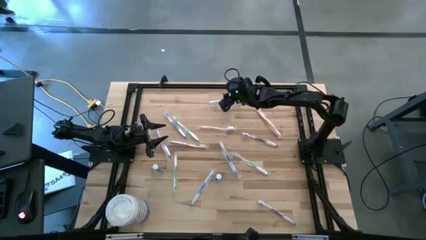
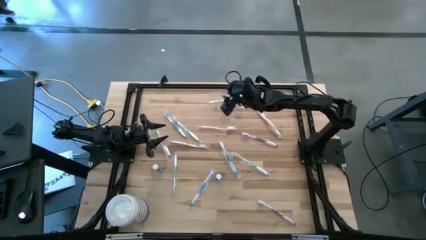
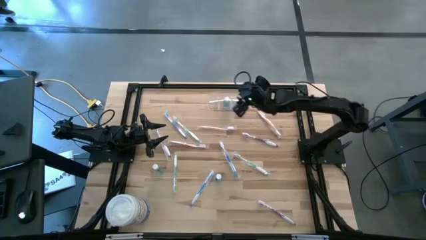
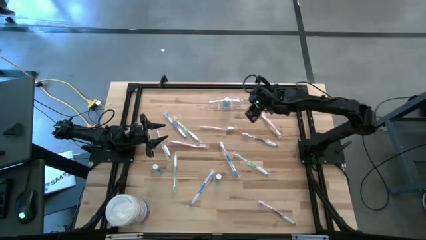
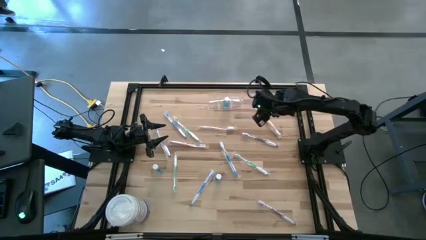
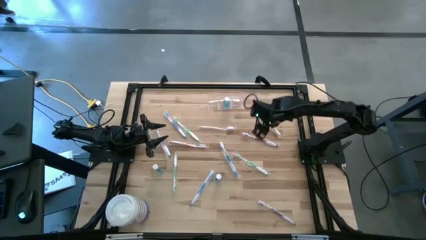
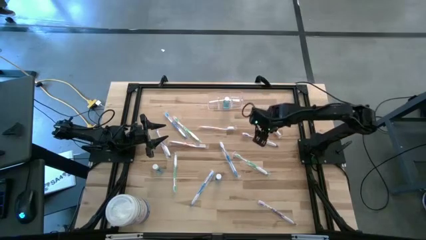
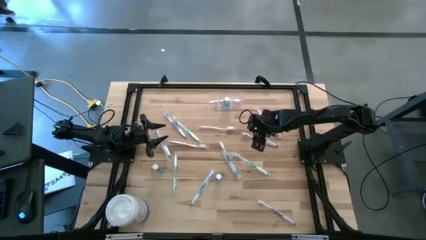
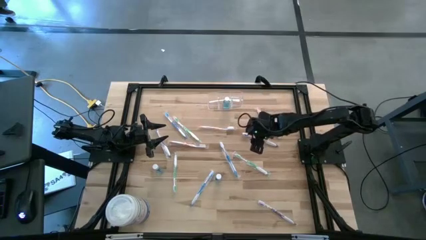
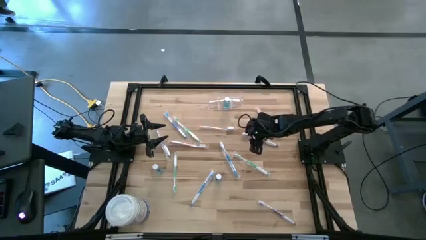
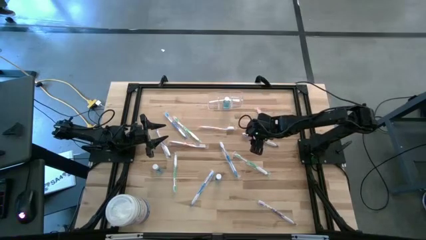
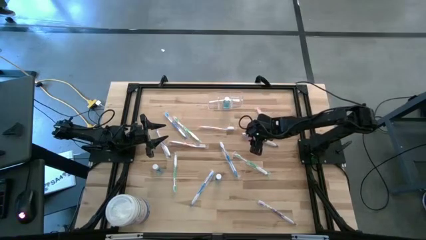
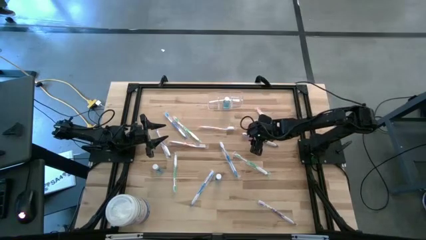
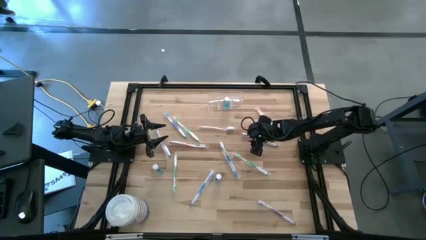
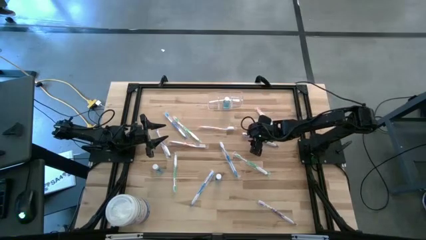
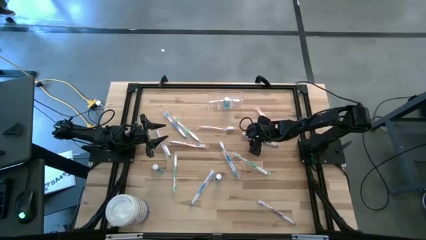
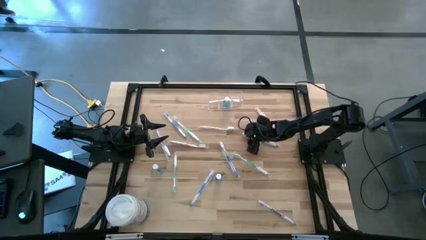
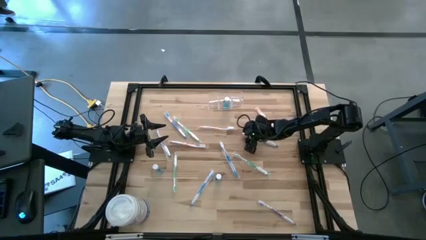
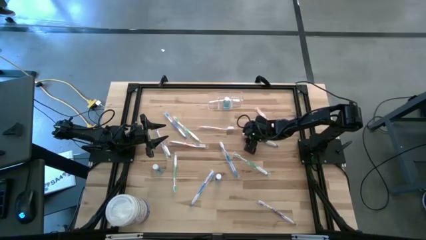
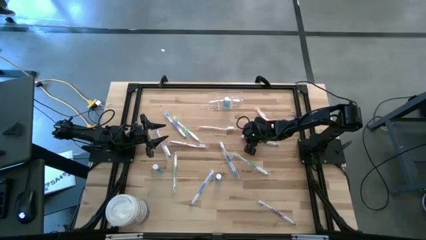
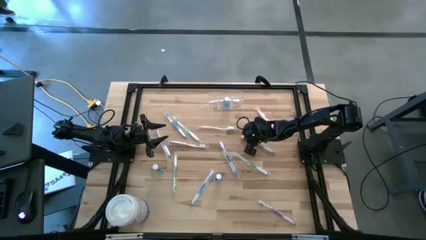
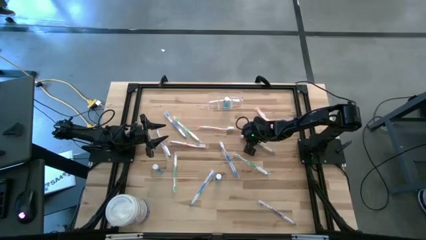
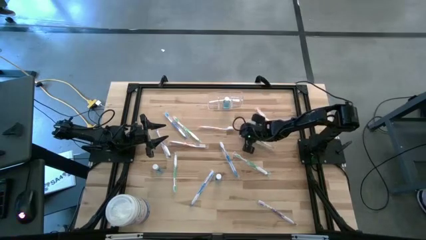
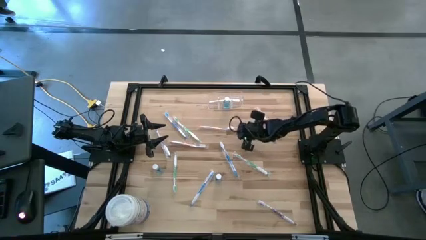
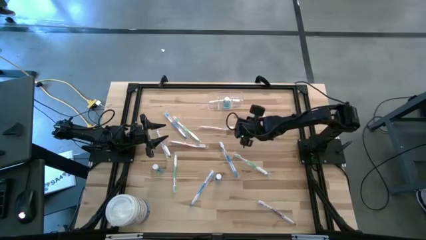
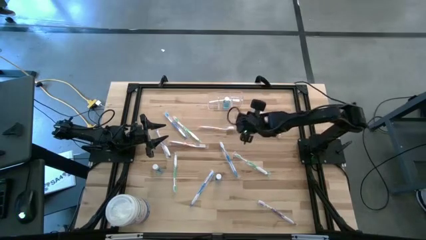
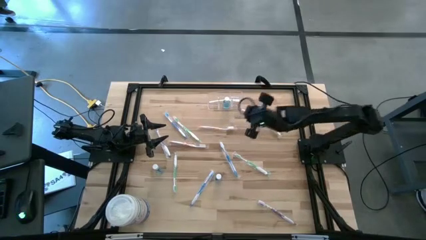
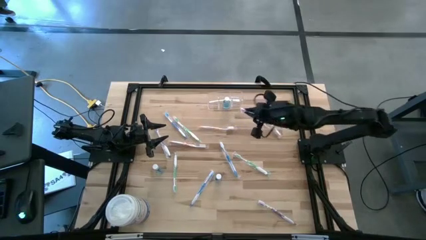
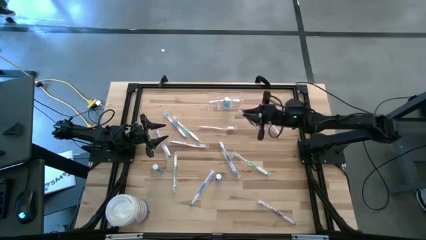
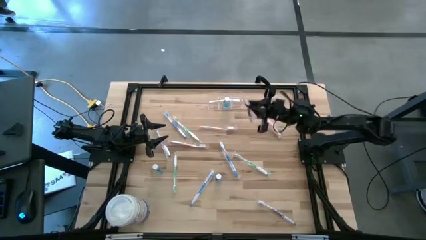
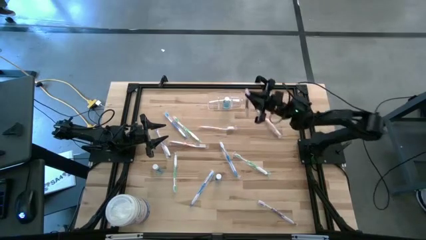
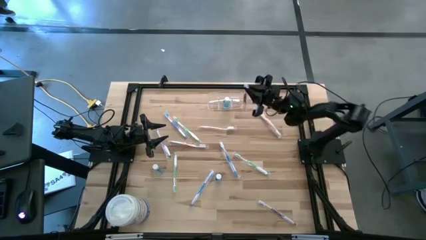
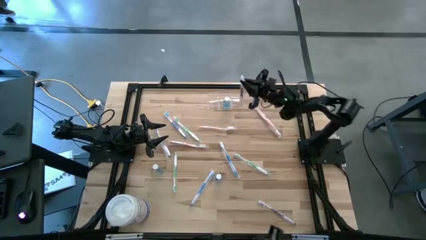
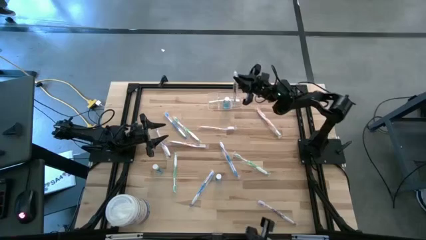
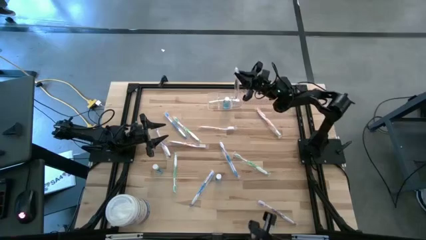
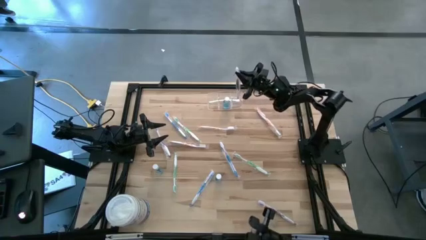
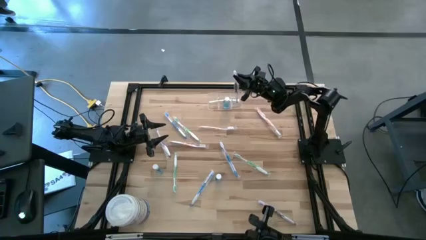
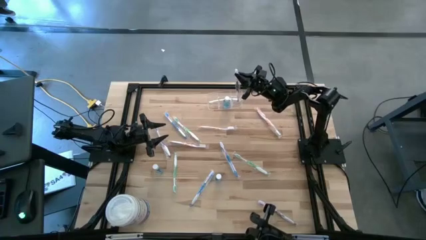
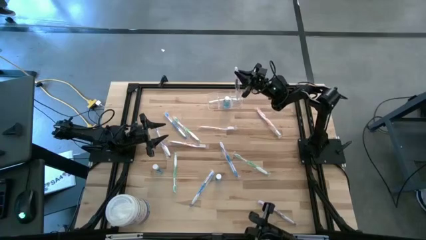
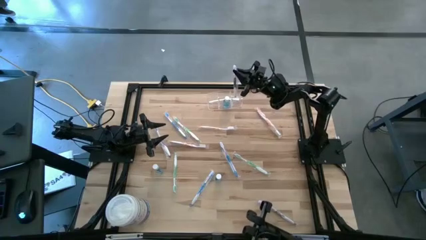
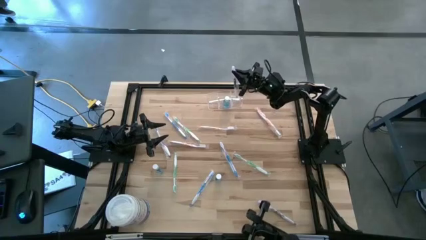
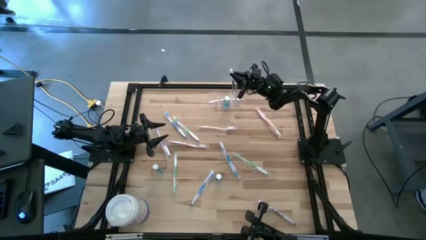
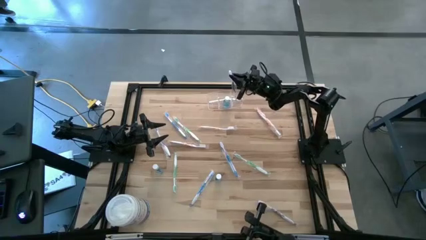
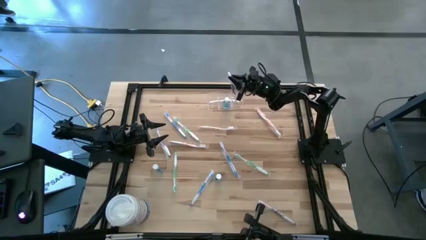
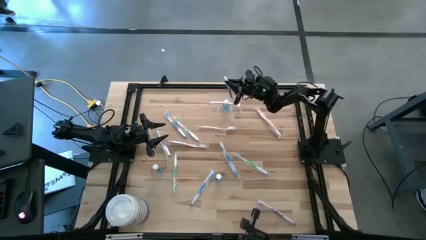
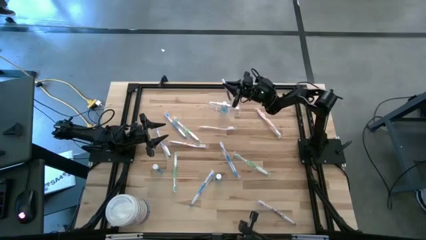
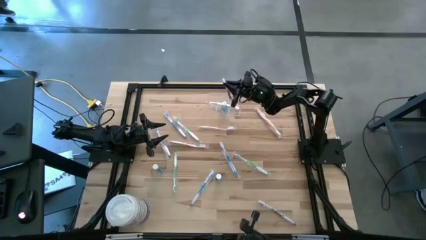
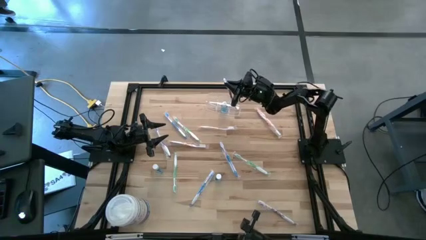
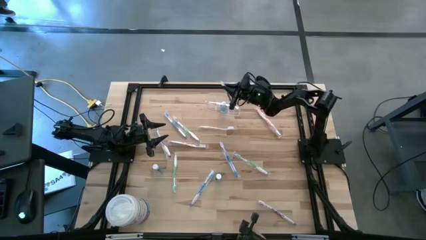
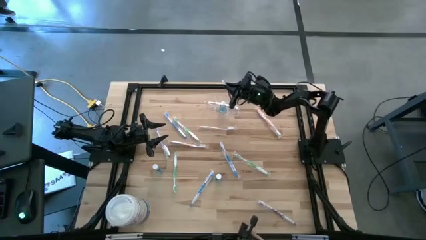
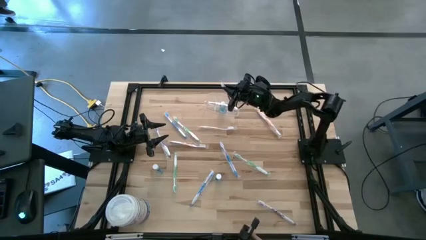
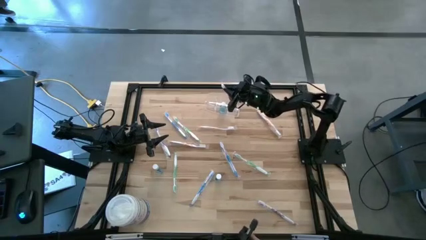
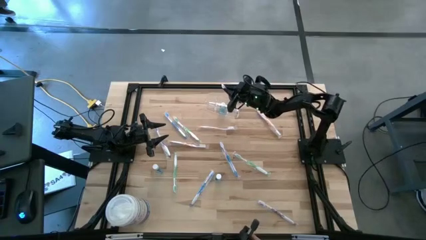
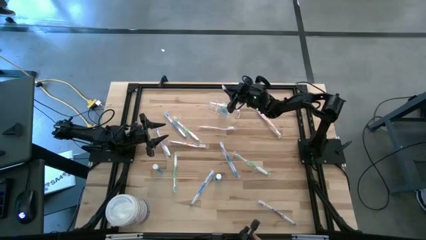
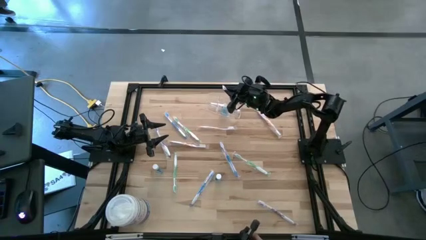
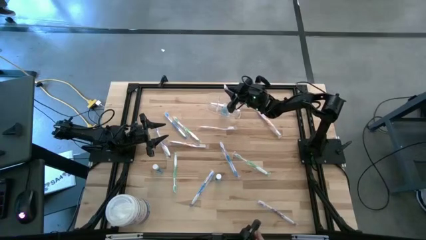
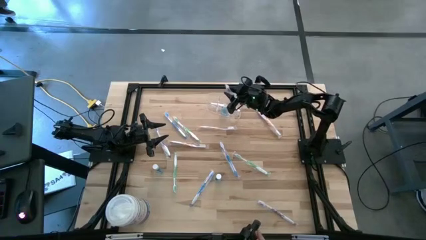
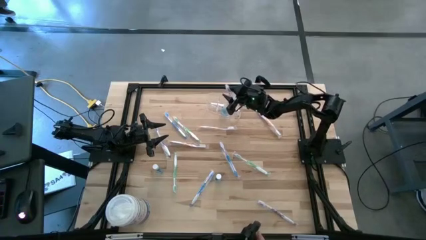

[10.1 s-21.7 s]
Task: Pick & Place toothbrushing station
Put the top right violet toothbrush into the transparent organizer

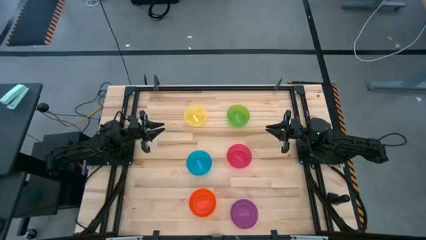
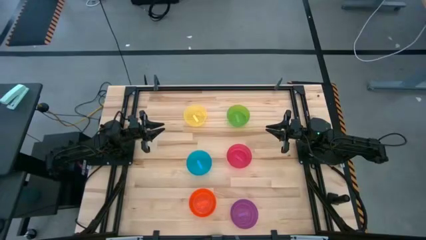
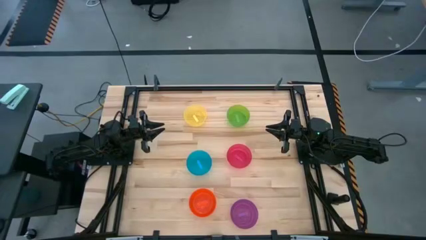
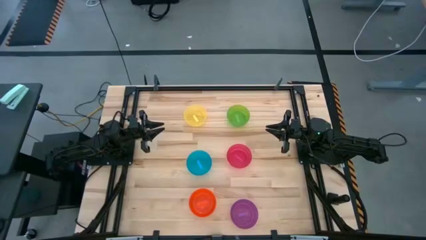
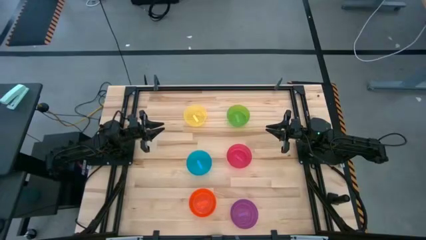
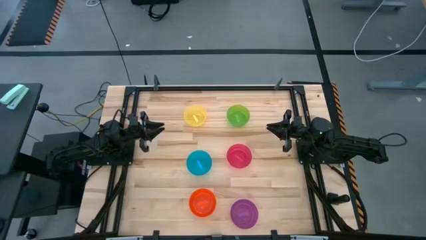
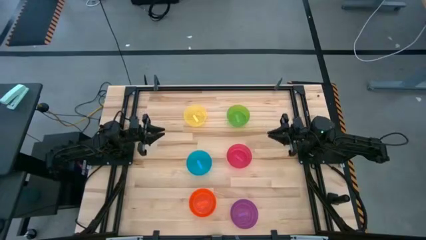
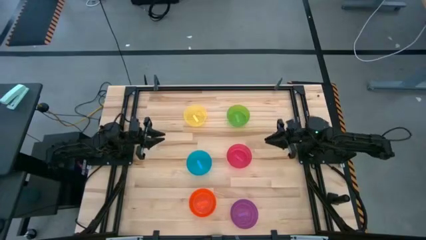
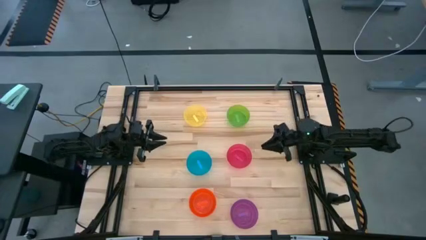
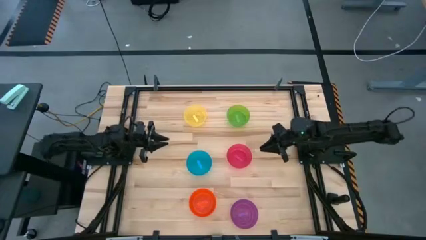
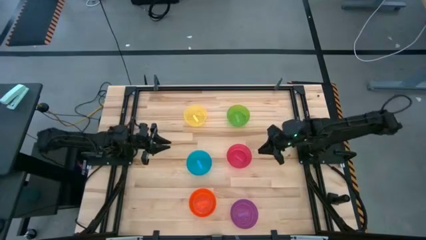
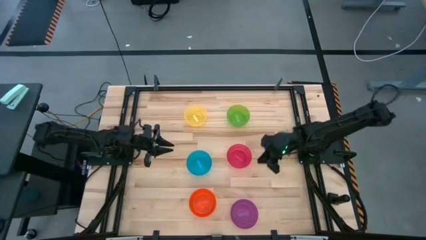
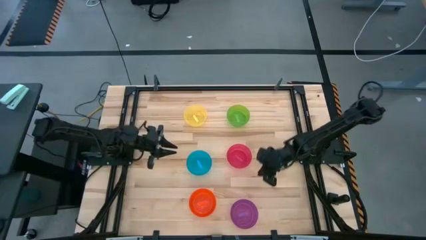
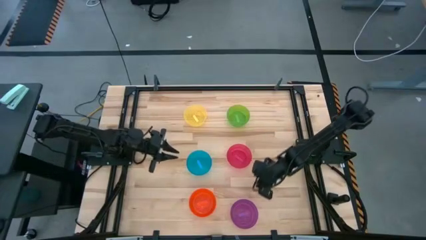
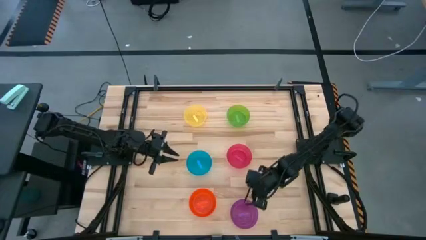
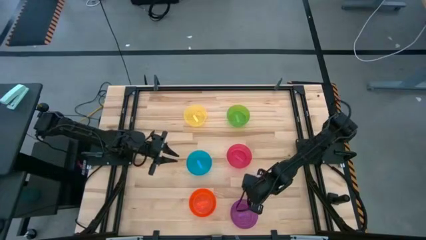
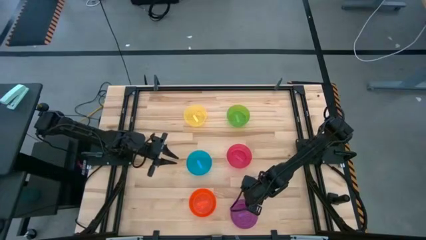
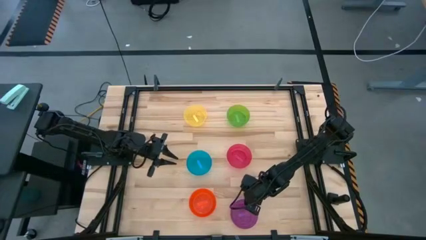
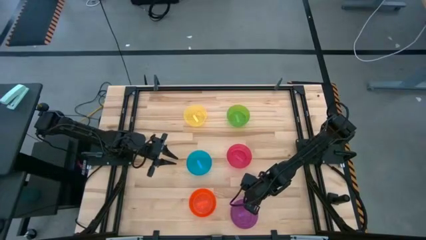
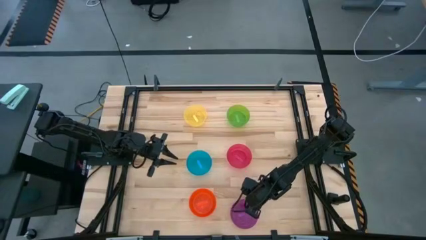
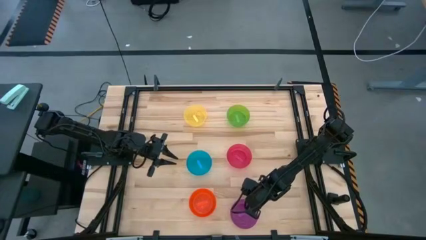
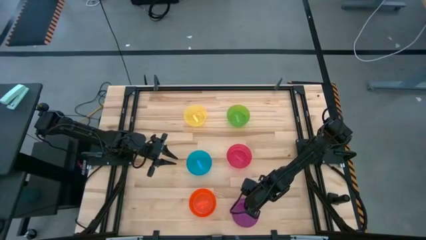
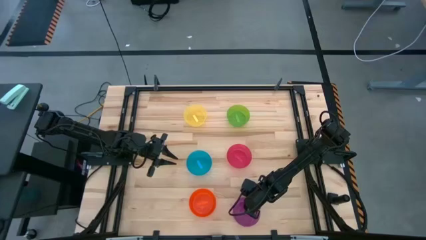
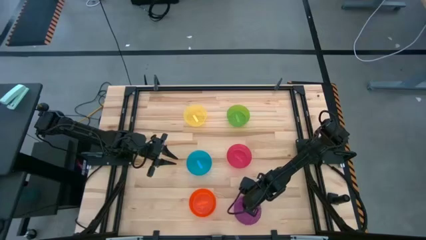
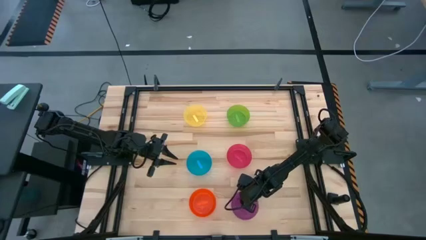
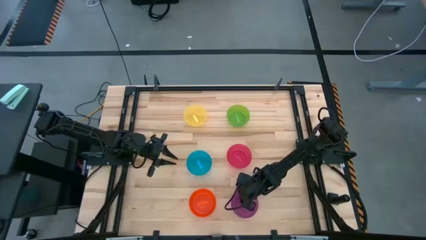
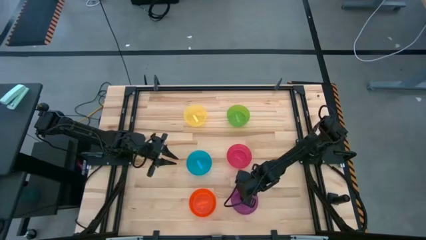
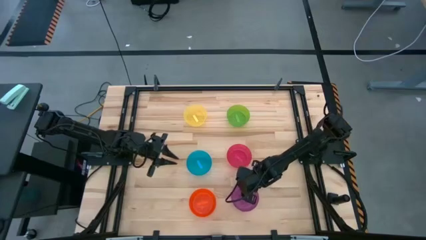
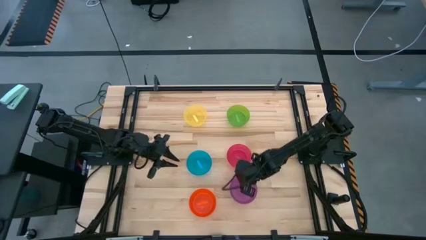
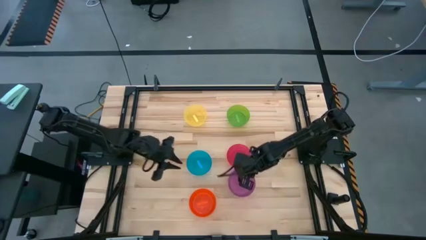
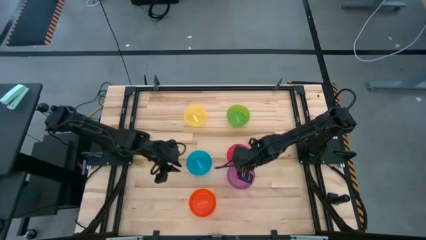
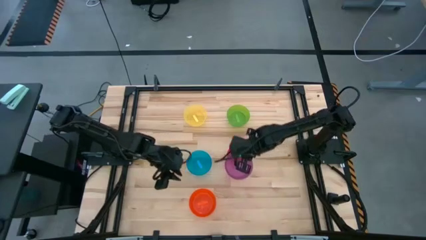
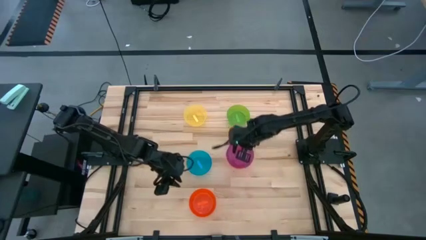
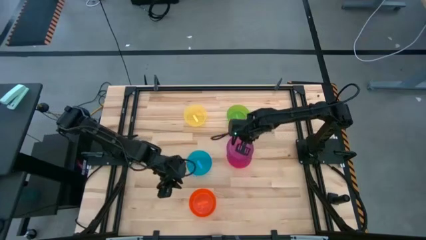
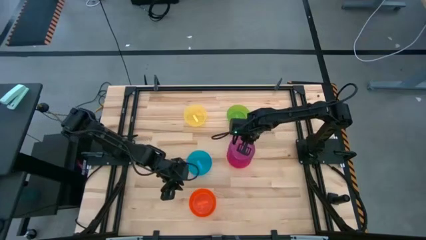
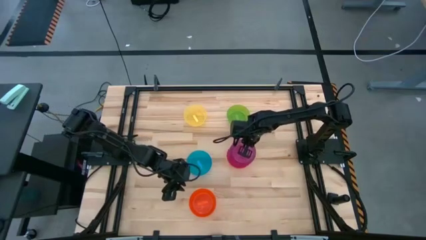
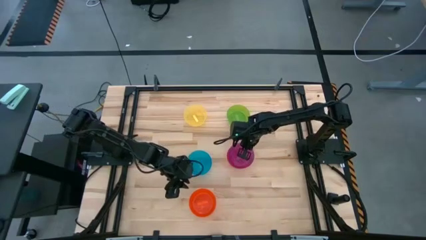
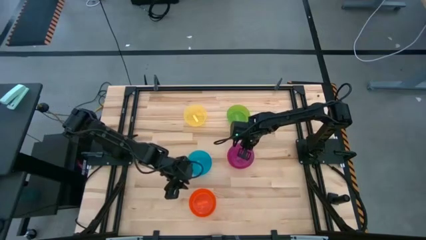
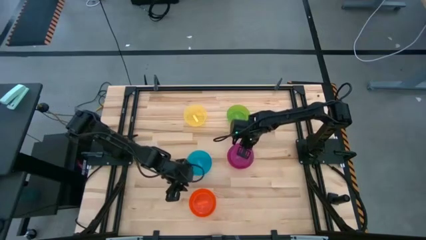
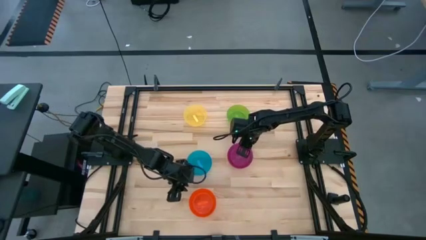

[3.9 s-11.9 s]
Task: Nest bowls inside each other
Stack the purple bowl on top of the red bowl
